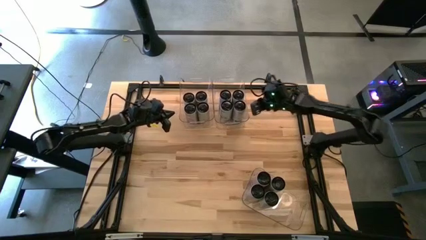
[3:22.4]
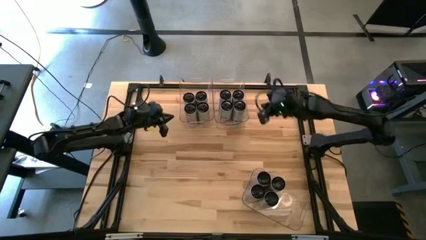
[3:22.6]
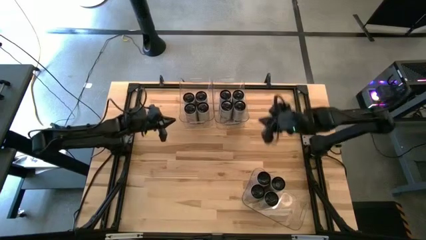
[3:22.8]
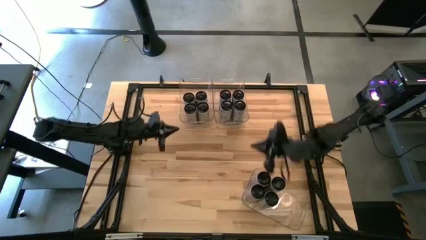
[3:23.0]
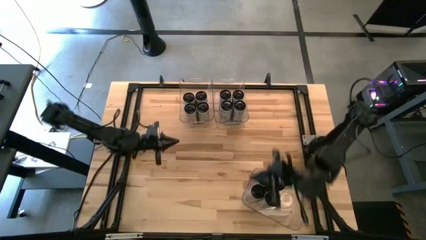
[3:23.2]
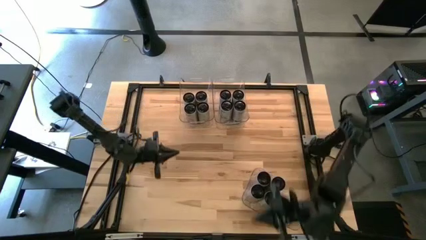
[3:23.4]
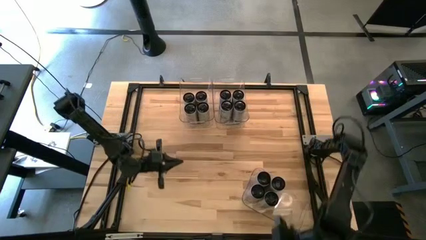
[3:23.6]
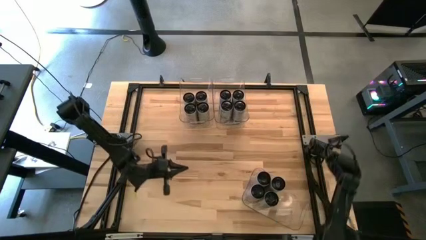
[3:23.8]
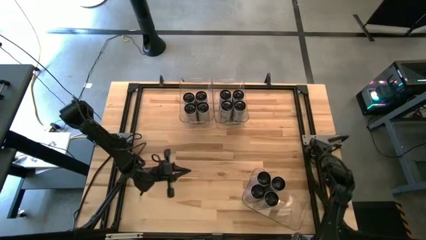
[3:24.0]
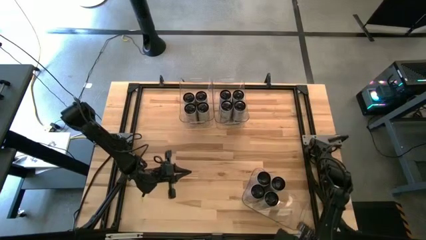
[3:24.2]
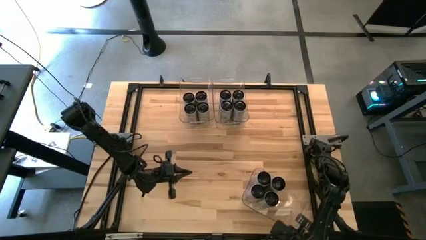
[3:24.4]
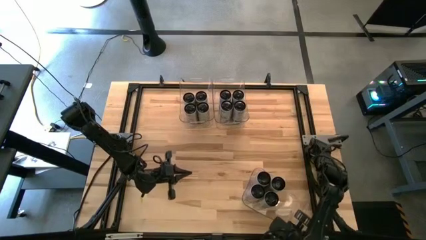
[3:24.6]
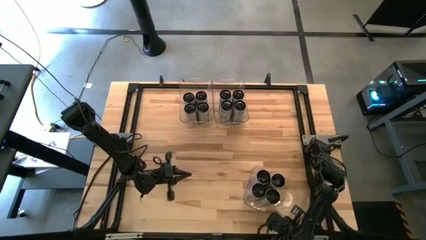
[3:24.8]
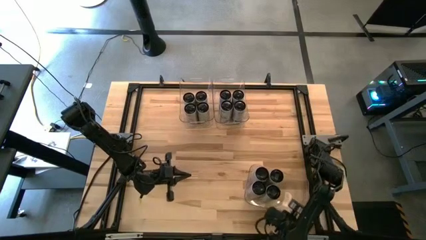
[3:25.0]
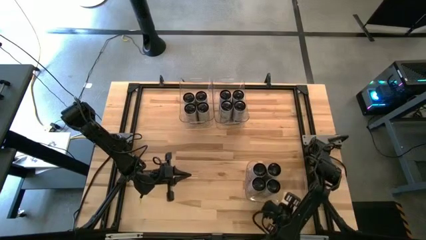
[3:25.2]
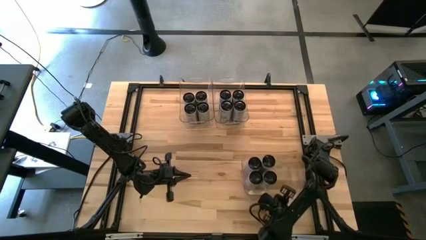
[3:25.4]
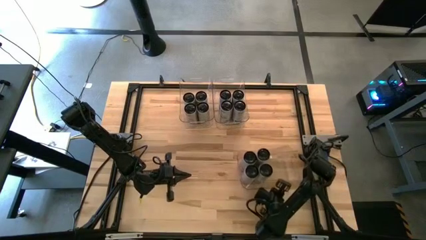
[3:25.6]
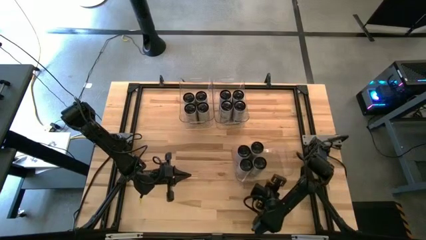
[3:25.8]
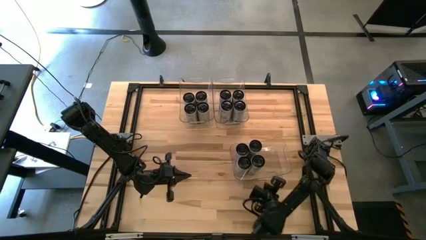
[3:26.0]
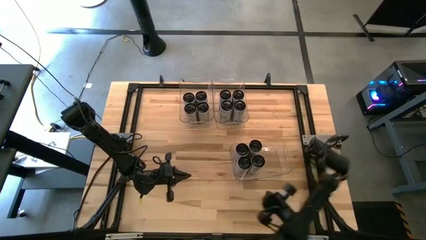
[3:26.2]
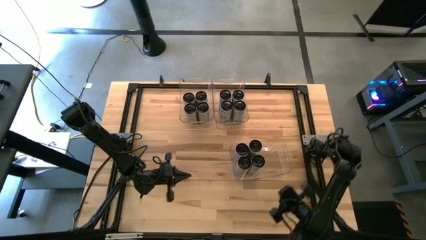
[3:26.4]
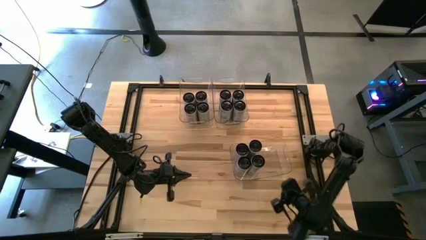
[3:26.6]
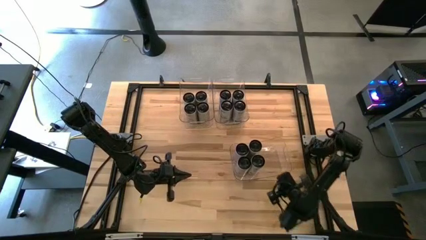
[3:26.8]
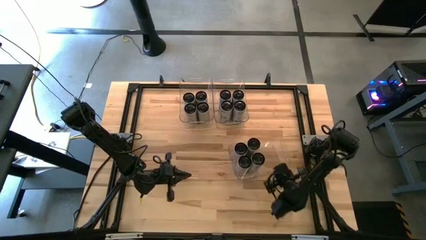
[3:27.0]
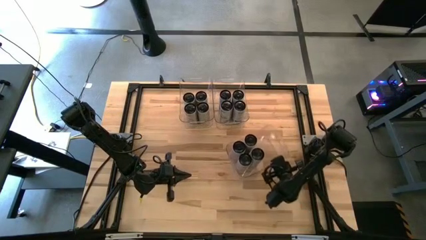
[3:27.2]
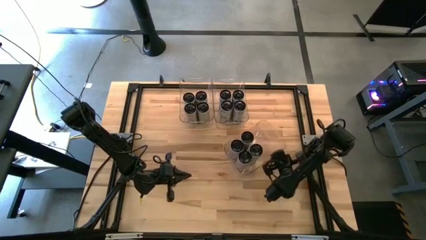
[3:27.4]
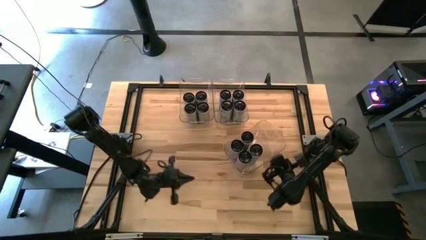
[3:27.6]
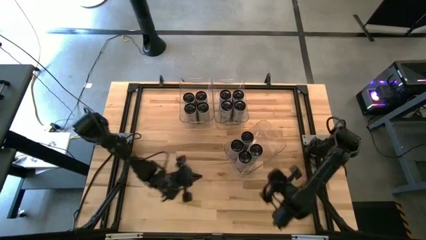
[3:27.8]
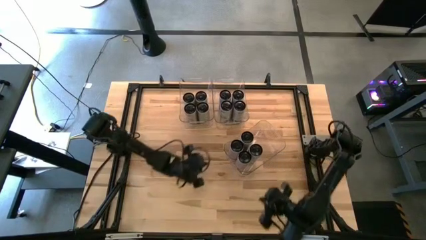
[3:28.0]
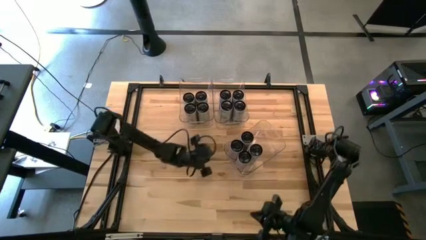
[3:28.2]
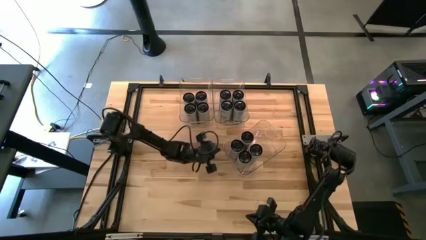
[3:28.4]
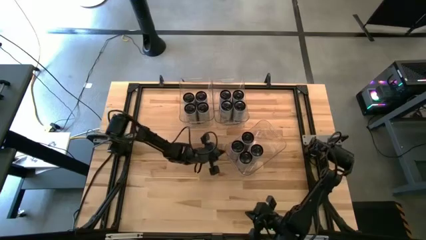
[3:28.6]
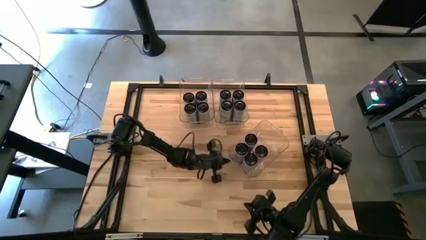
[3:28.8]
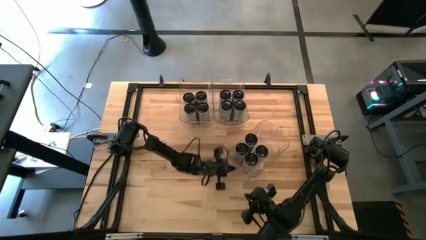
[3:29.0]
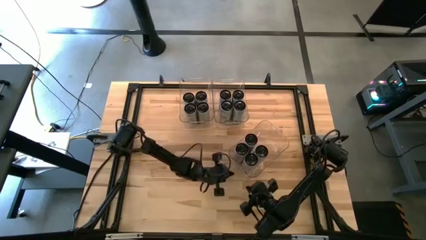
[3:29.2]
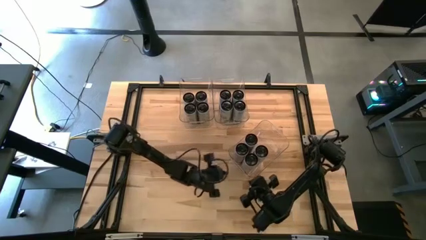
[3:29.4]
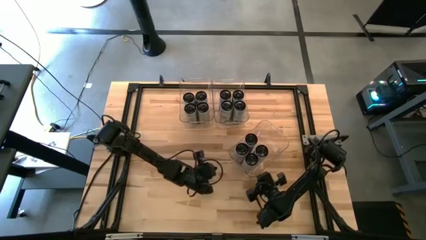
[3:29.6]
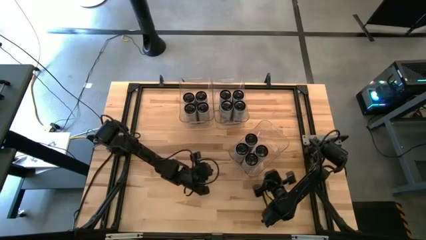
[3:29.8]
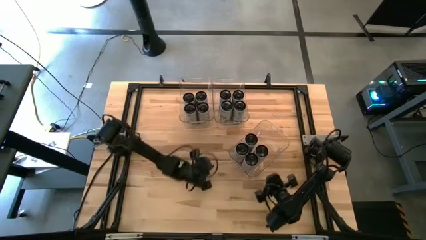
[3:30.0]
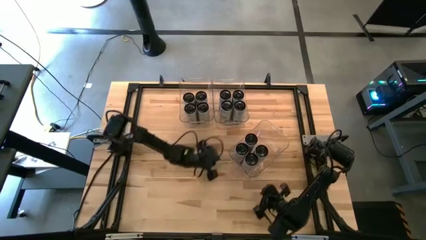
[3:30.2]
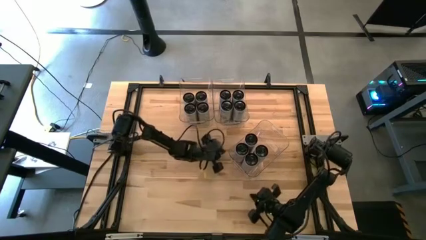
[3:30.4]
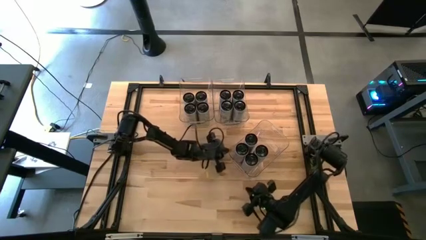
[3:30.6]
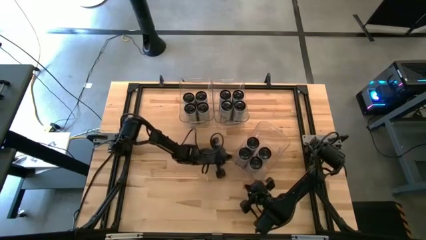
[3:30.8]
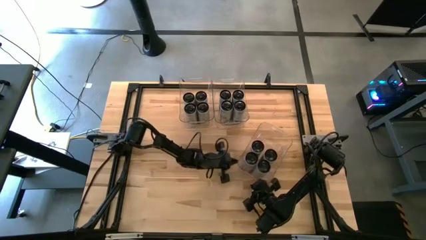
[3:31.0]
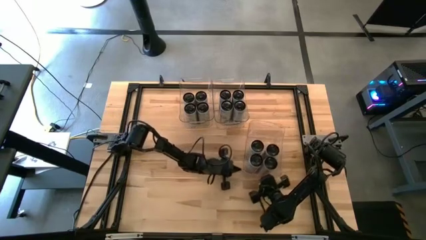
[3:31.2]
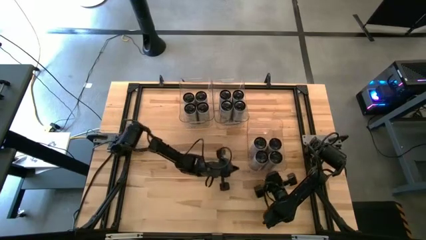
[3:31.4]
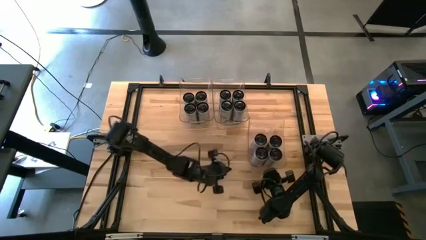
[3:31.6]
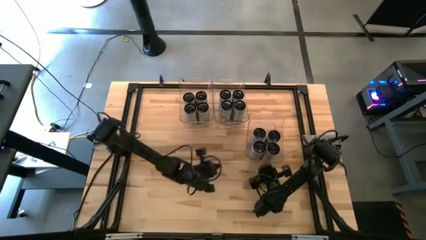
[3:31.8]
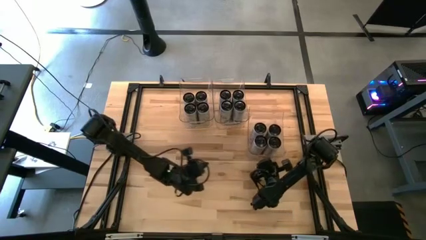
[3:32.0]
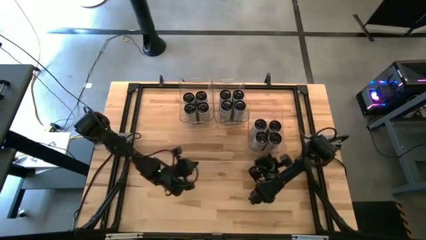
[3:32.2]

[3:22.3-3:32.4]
Task: Sort soda cans
Move the bottom right transparent bin to the top right of the table

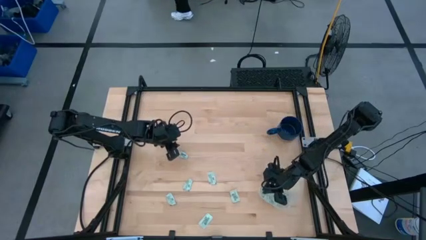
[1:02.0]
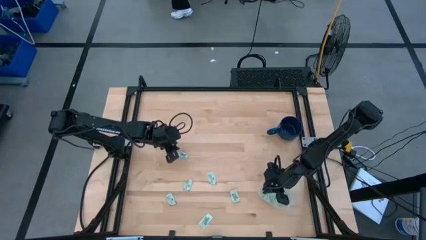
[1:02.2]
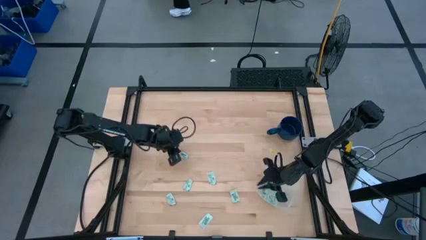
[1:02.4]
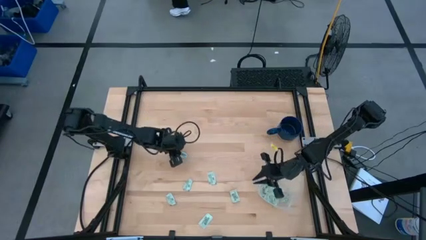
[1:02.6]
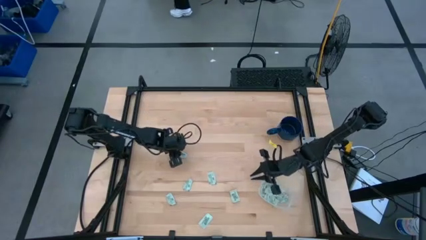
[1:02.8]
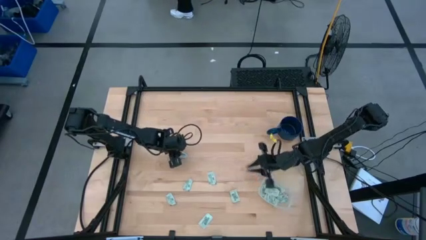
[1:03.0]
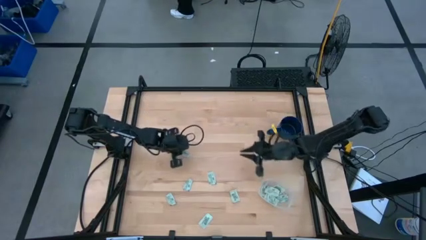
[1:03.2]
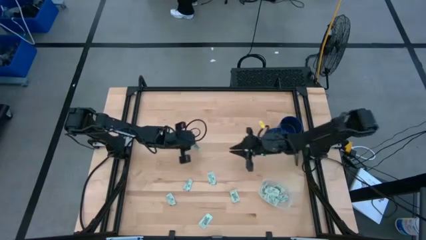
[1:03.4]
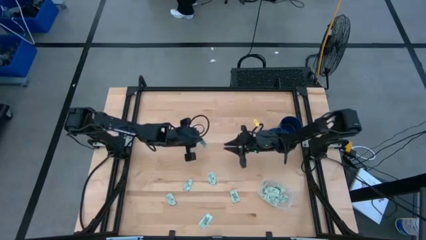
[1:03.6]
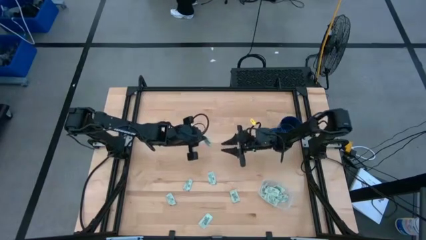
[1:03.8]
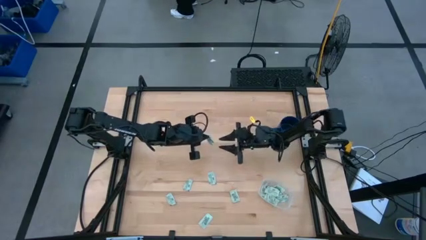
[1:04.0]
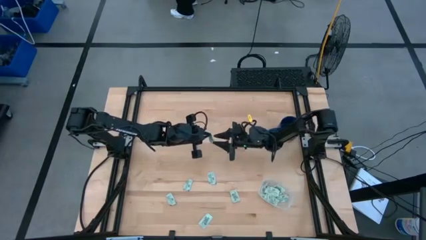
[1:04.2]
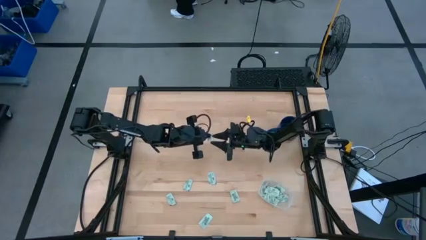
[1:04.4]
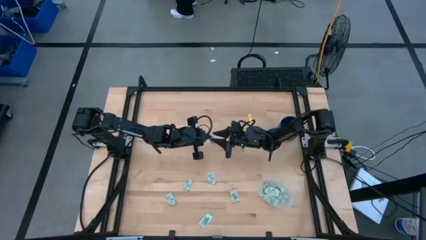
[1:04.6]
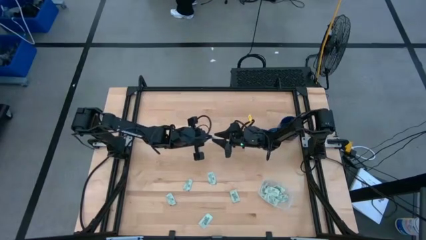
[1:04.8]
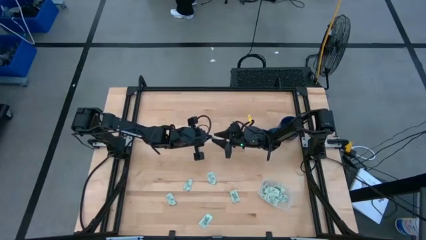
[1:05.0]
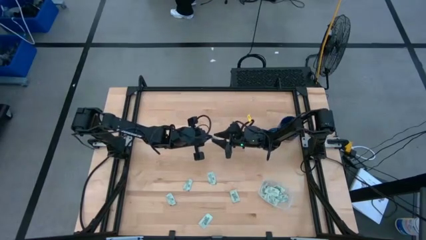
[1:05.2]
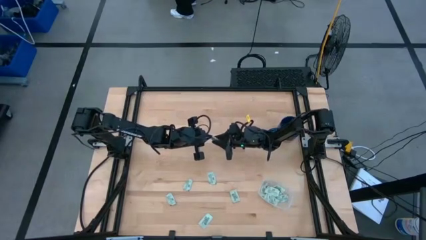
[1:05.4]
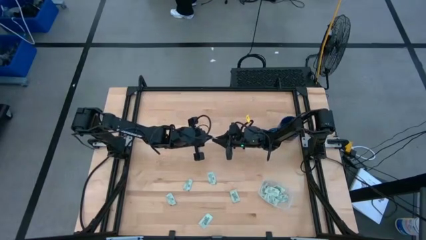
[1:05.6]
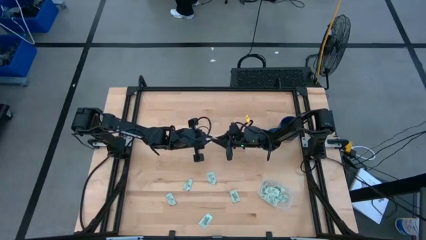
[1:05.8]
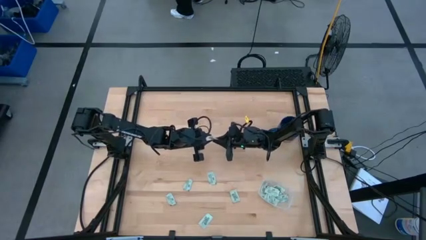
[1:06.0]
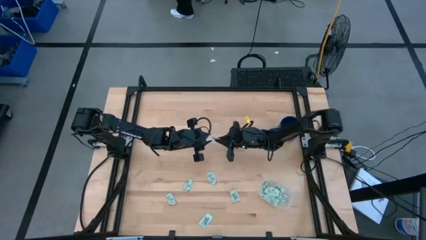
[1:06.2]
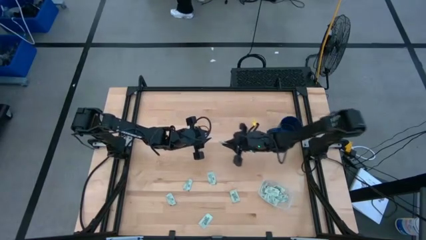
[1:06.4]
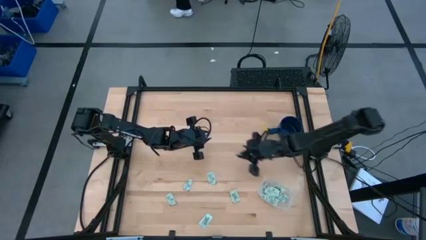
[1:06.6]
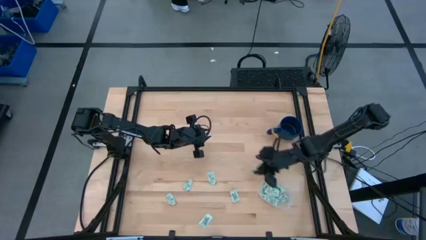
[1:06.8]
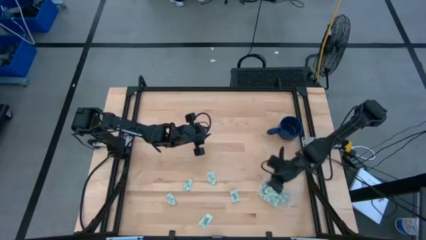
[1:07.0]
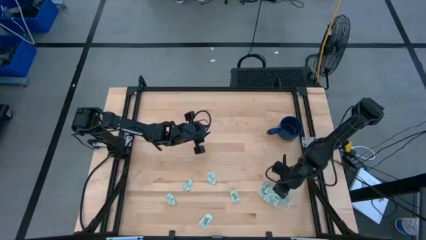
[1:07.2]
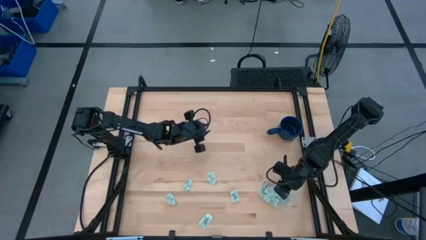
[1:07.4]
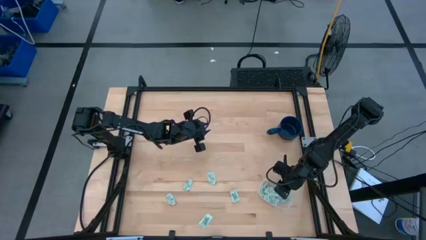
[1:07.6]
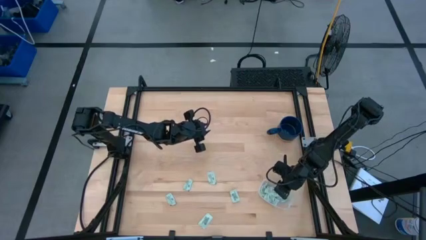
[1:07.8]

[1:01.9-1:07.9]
Task: Pick and place Stevia / Truvia into bins
Put the stevia packet into the transparent container

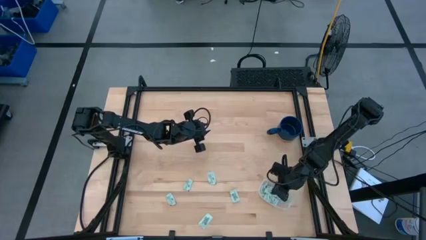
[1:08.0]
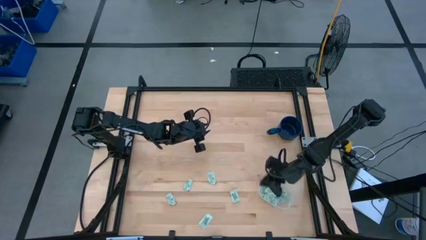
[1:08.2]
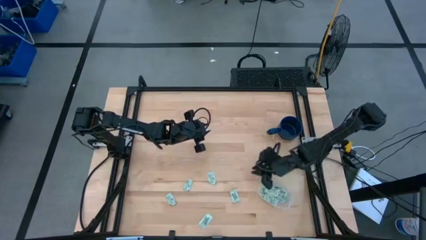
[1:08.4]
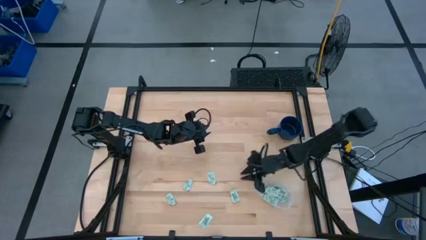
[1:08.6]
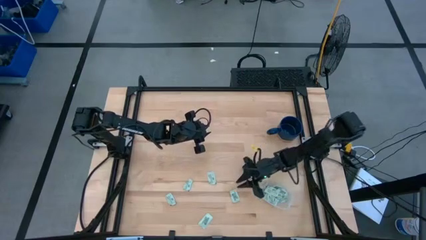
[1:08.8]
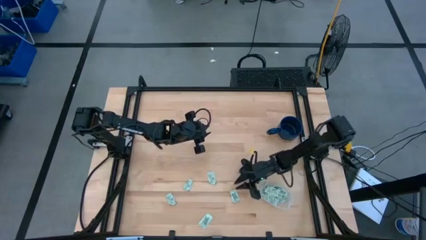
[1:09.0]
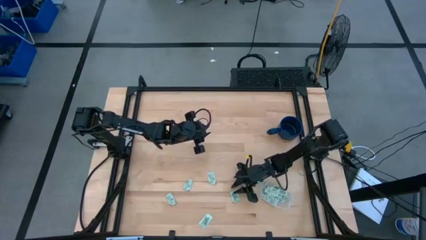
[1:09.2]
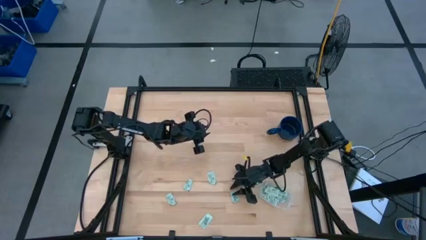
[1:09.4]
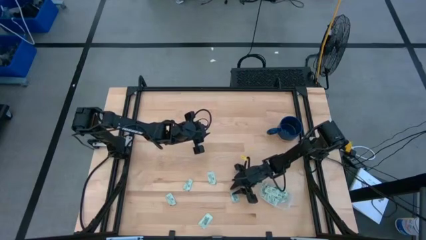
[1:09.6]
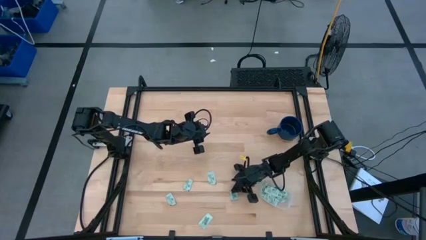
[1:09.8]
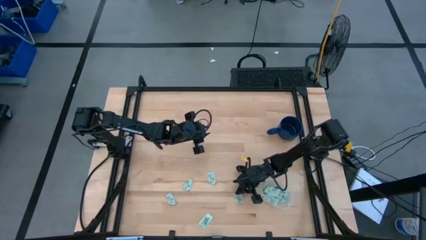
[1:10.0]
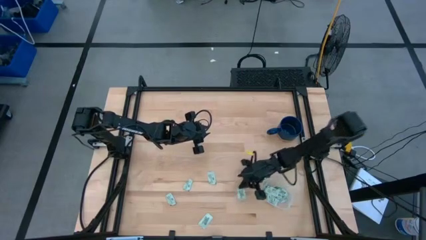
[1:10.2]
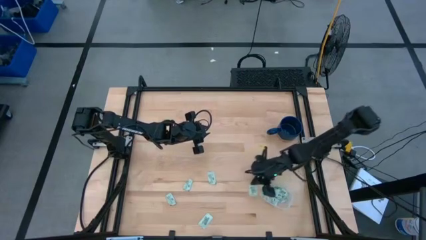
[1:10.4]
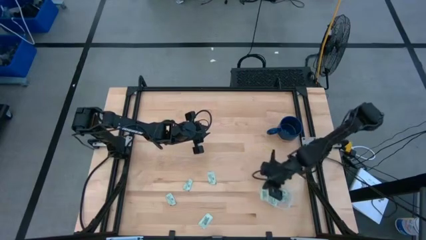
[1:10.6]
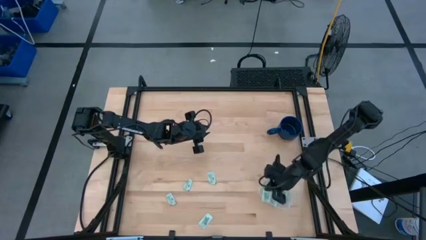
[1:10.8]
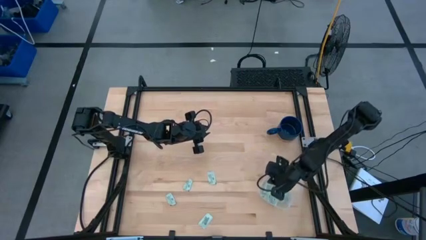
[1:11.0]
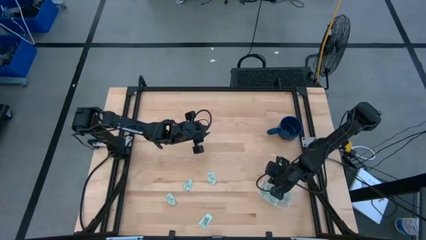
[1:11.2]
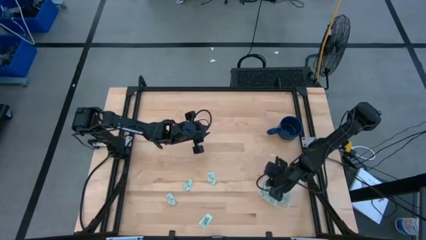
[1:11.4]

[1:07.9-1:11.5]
Put the stevia packet into the transparent container
